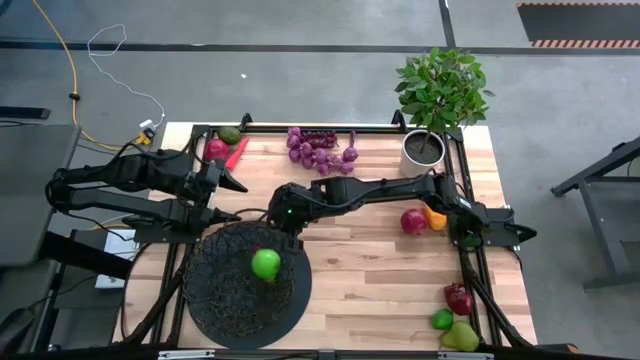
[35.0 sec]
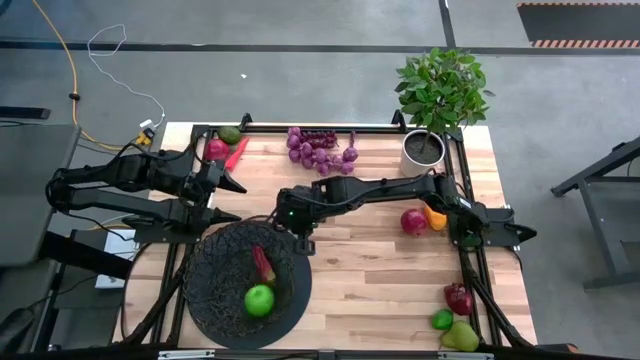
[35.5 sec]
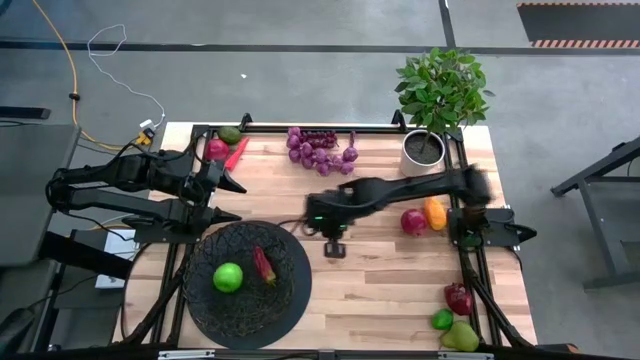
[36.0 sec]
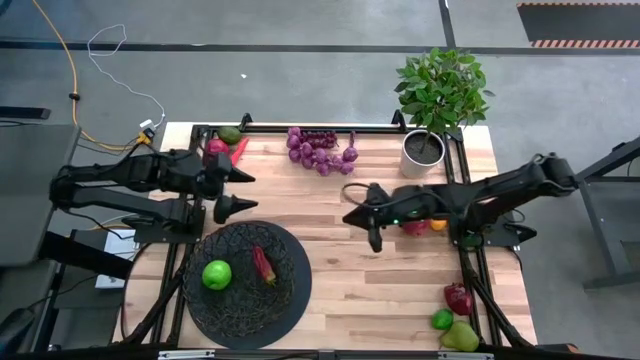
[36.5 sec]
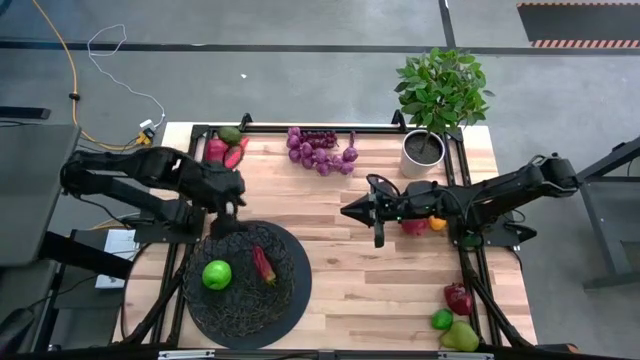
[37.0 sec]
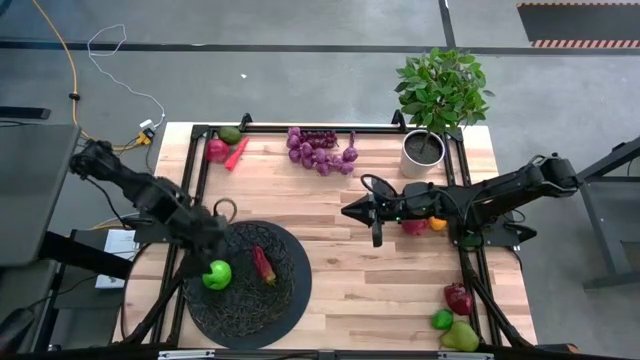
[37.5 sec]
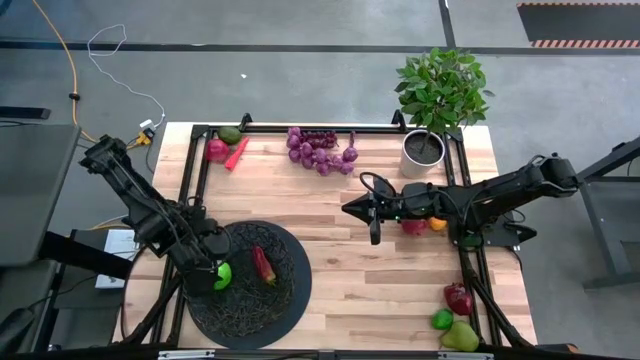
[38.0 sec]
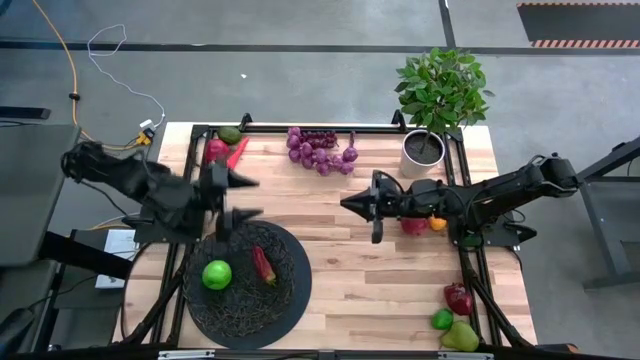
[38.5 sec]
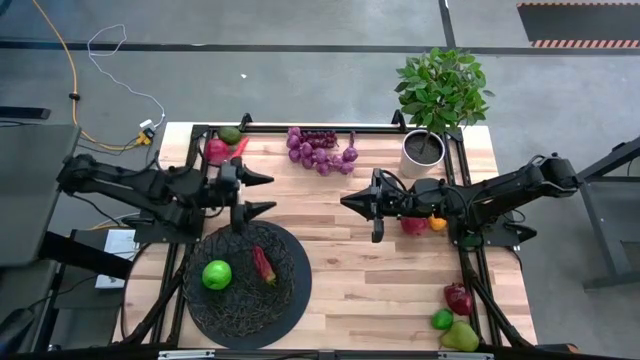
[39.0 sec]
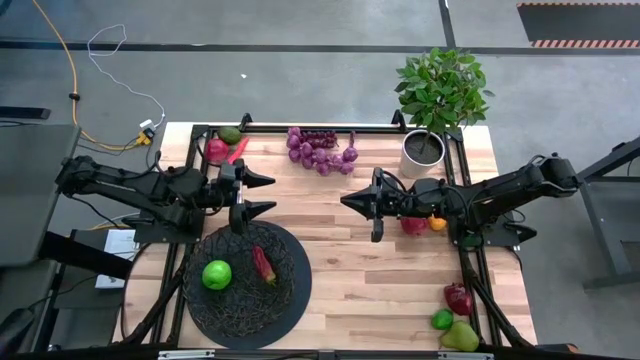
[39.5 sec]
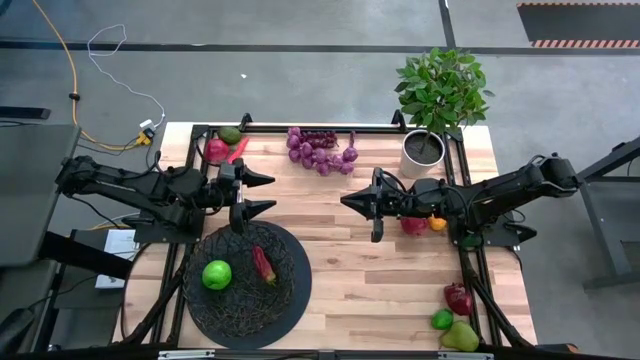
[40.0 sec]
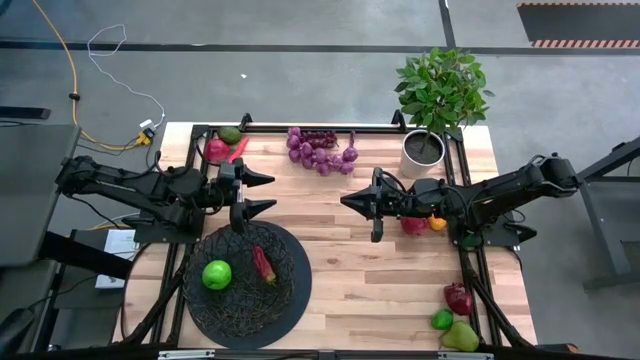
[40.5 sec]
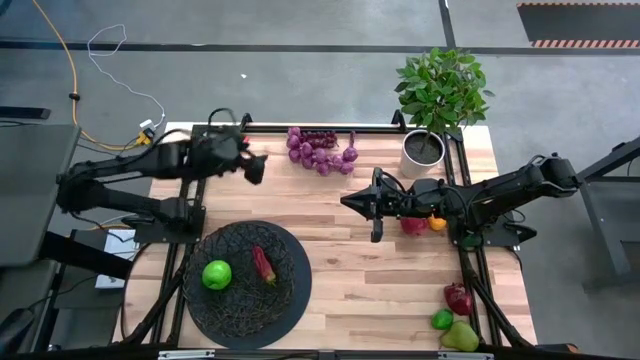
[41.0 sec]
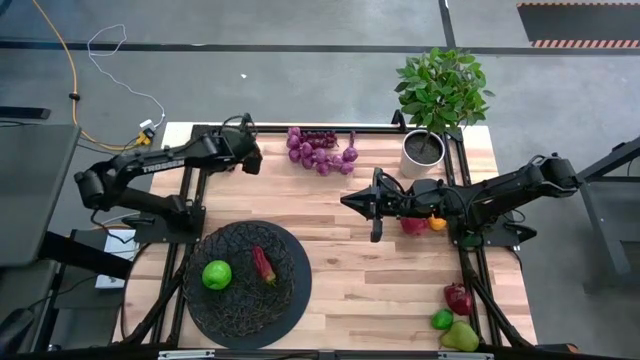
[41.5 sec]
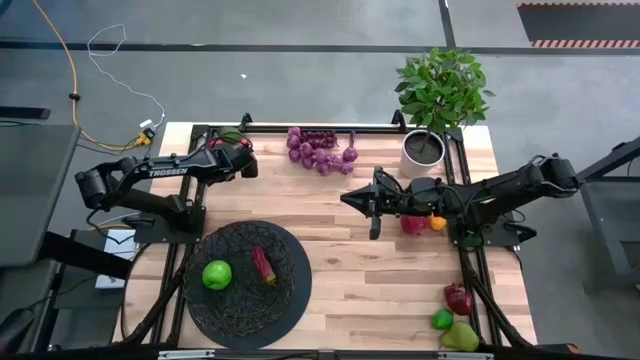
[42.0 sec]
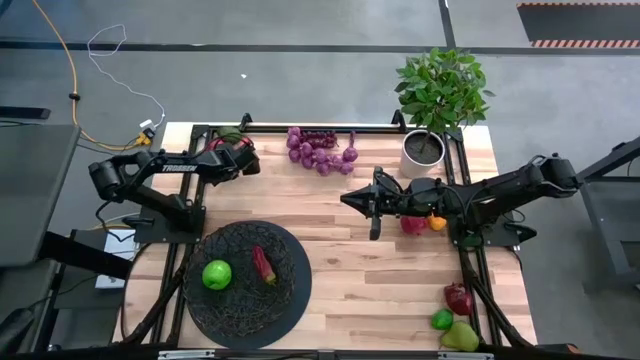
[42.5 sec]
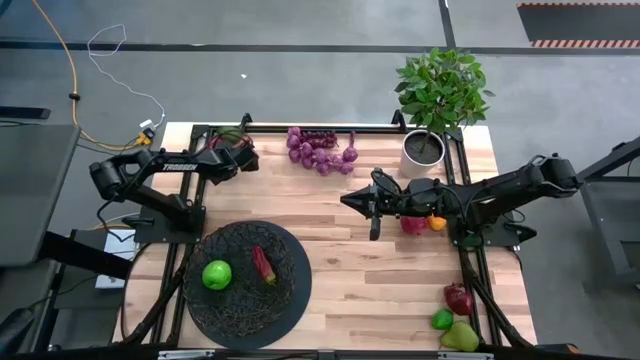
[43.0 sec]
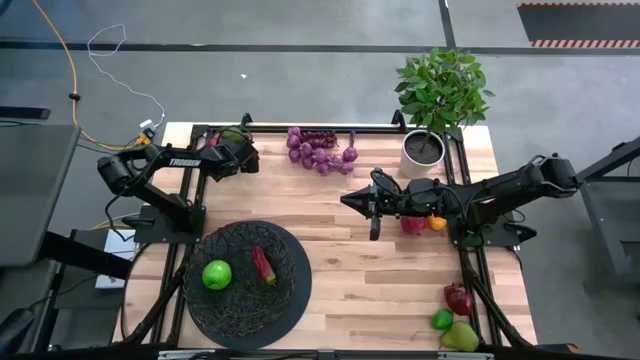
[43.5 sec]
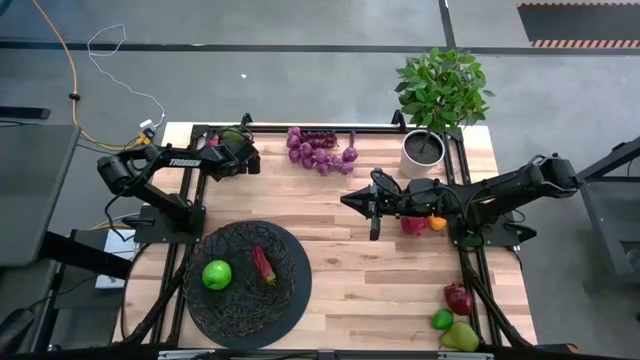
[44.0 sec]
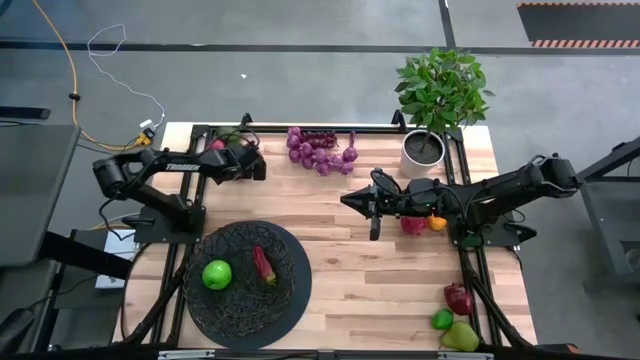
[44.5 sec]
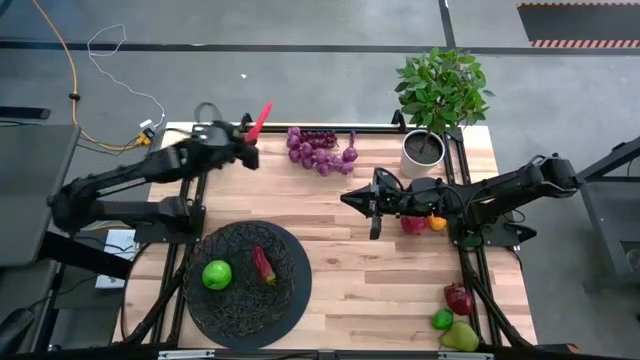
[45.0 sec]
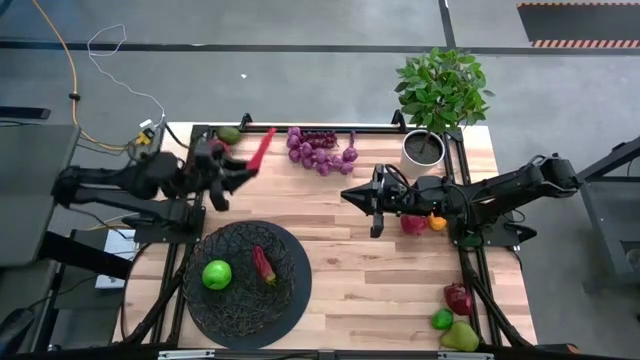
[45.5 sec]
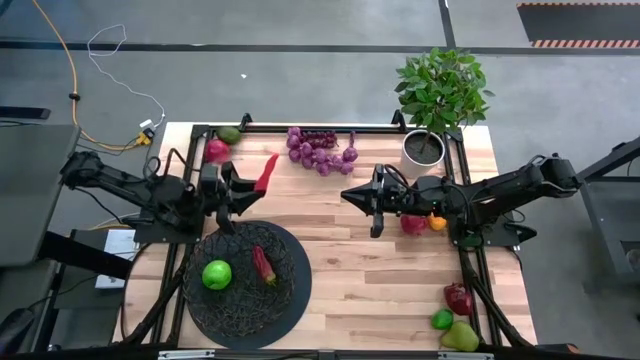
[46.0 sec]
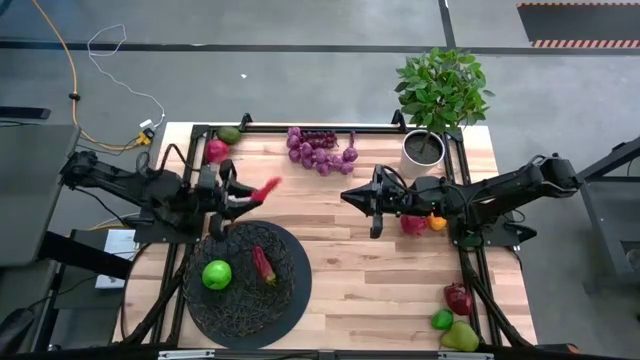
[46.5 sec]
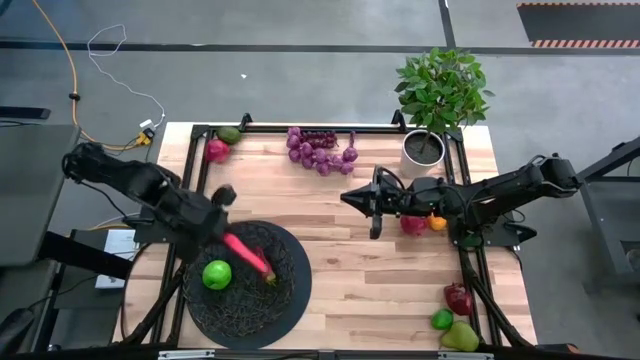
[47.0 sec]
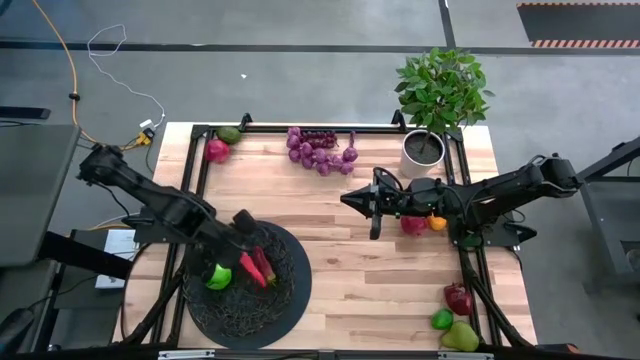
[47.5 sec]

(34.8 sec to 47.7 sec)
Task: Build produce basket
Put the red chili pepper into the black basket

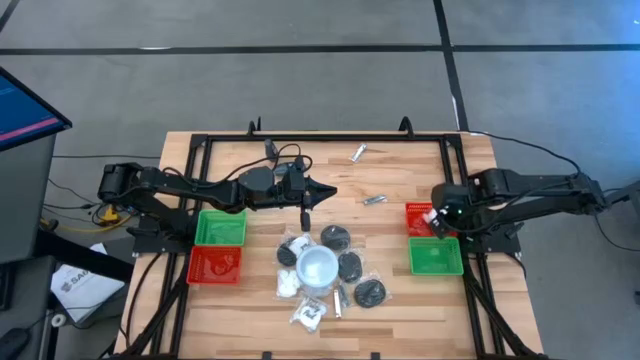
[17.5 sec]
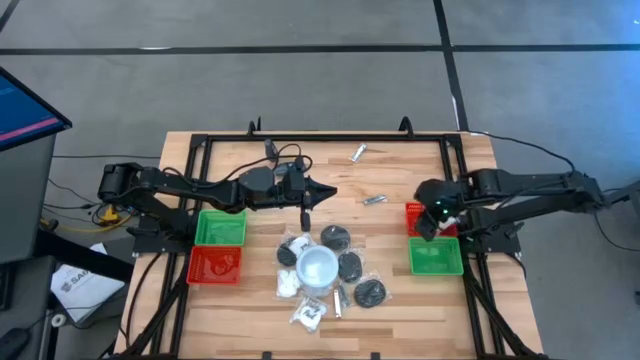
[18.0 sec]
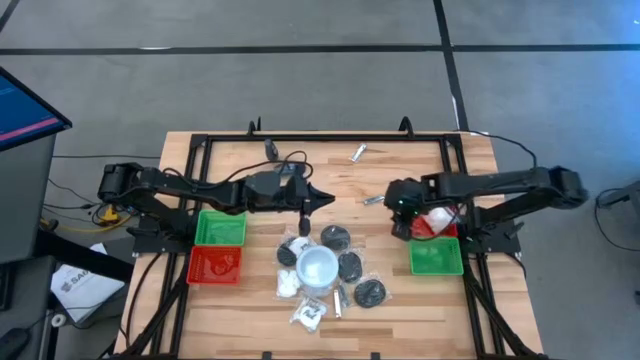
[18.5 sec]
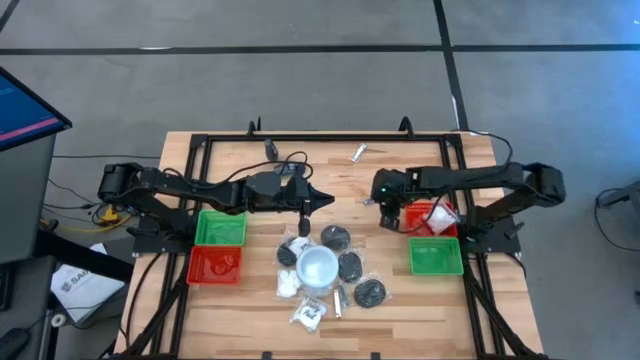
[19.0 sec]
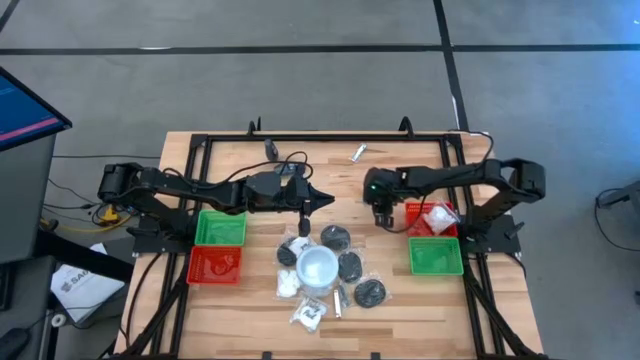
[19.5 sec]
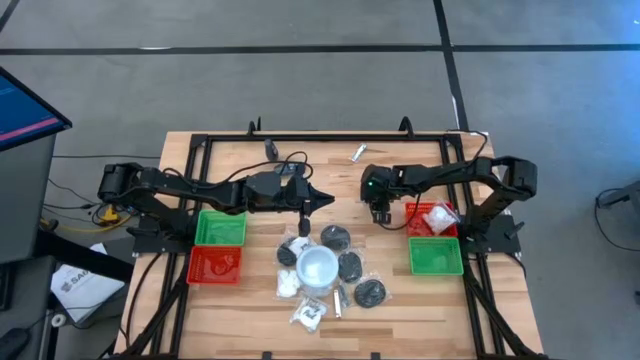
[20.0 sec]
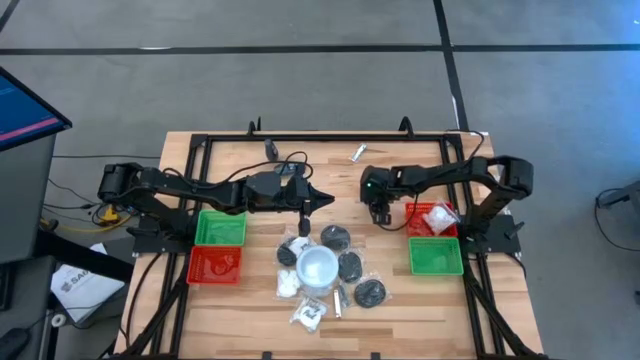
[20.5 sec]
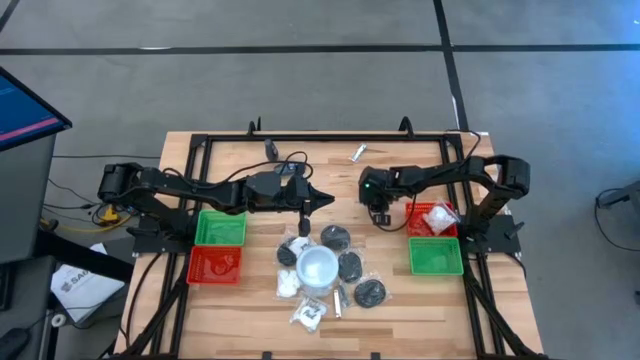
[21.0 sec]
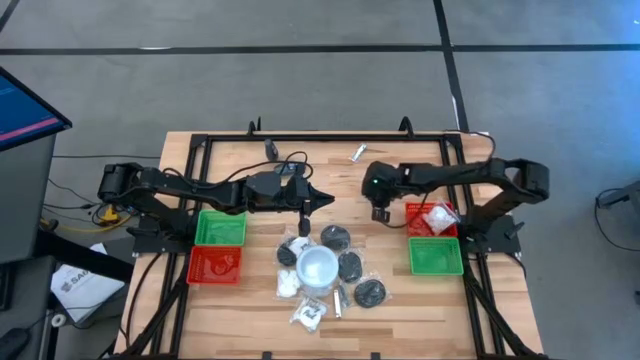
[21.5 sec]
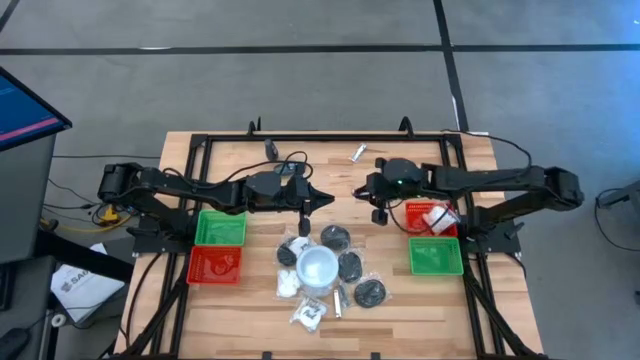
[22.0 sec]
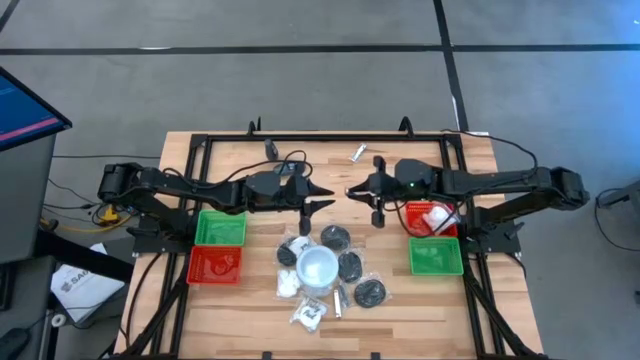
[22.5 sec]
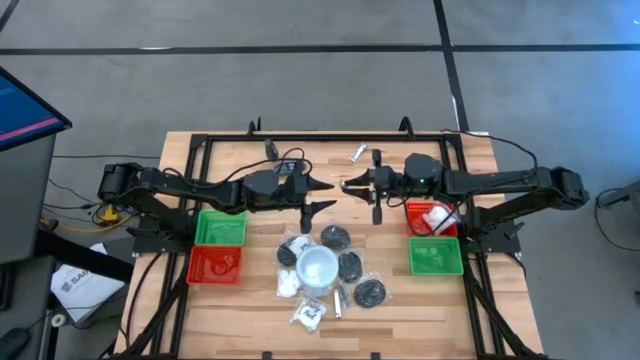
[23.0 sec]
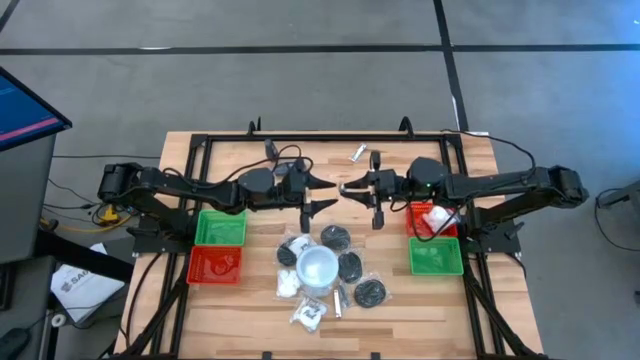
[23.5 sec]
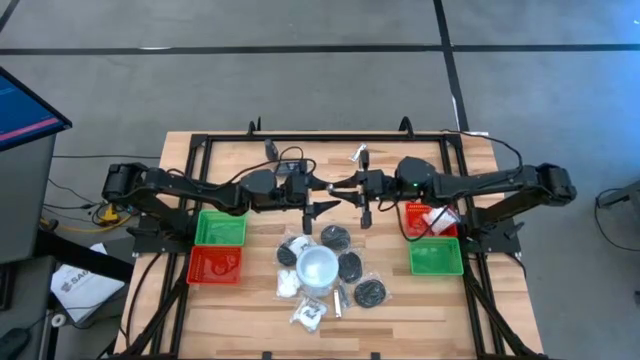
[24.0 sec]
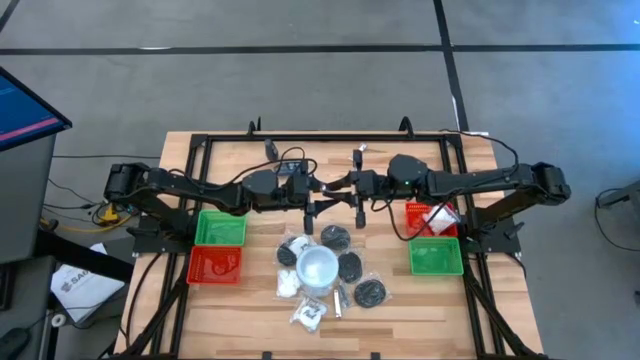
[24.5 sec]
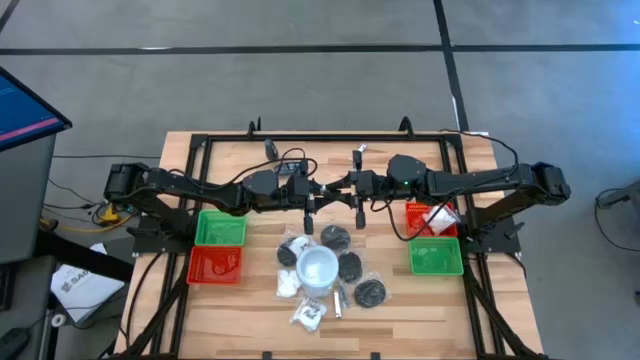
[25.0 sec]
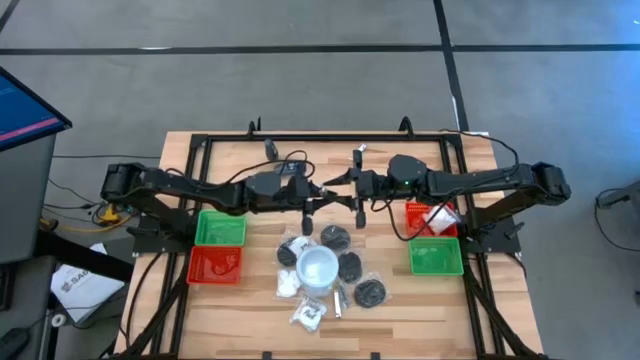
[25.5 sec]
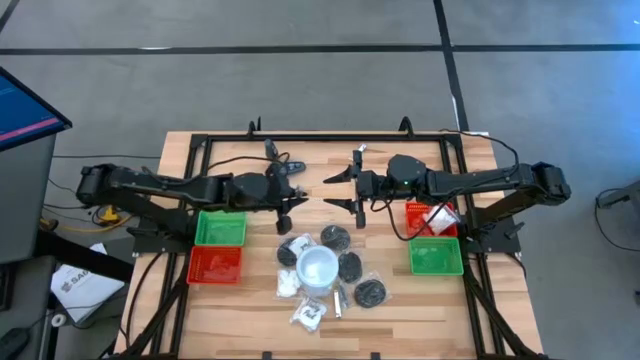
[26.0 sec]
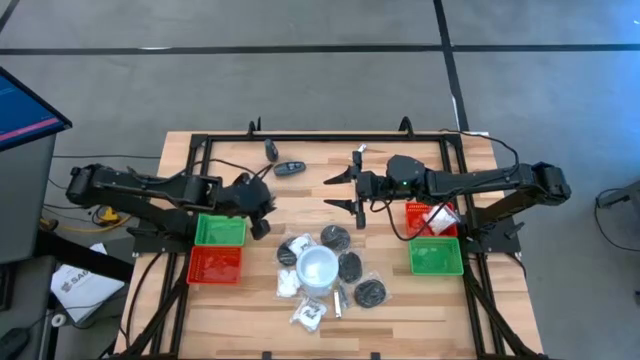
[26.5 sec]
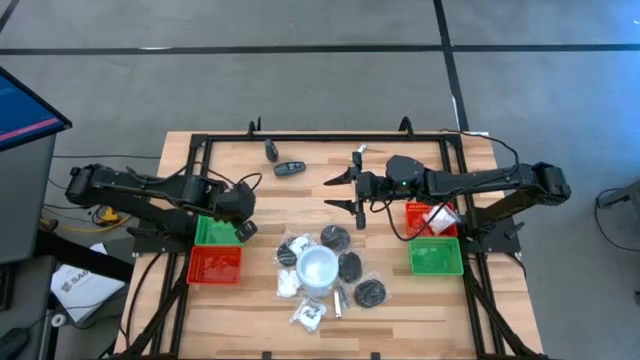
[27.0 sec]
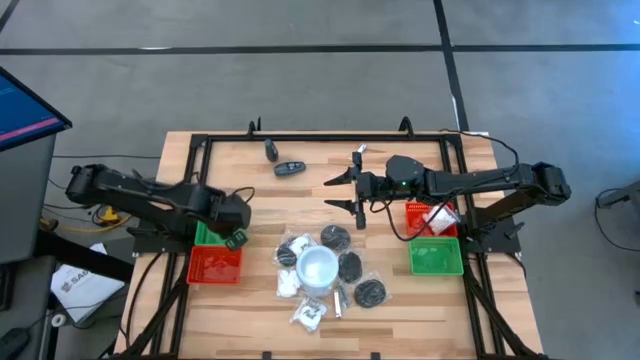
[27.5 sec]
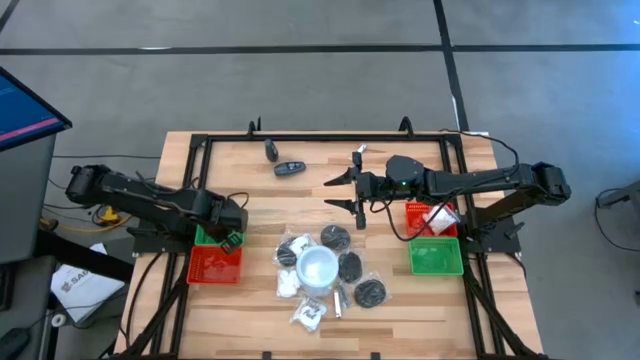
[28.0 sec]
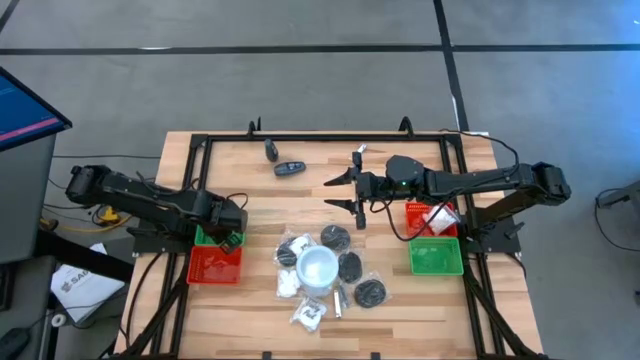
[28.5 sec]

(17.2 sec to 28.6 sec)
Task: Pick & Place Travel size toiletries
Put the silver nail cutter into the left green bin
